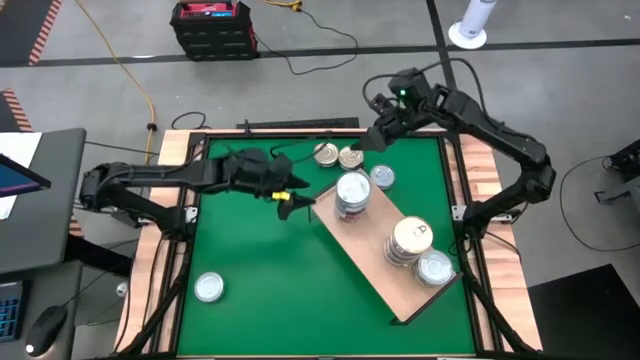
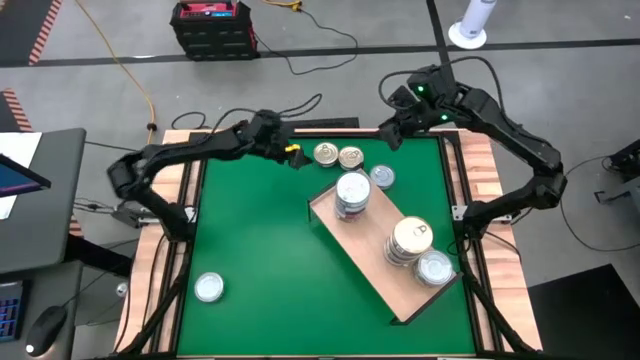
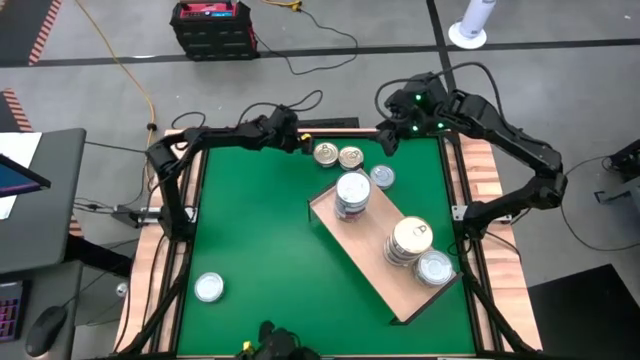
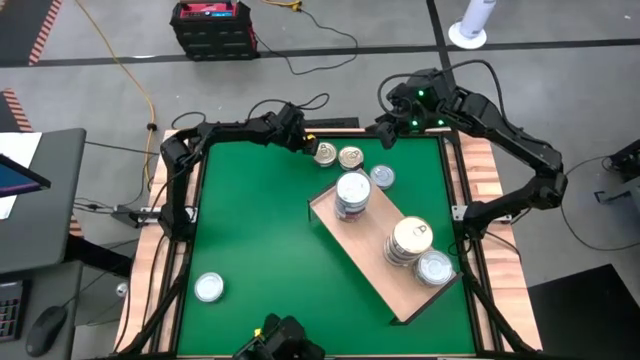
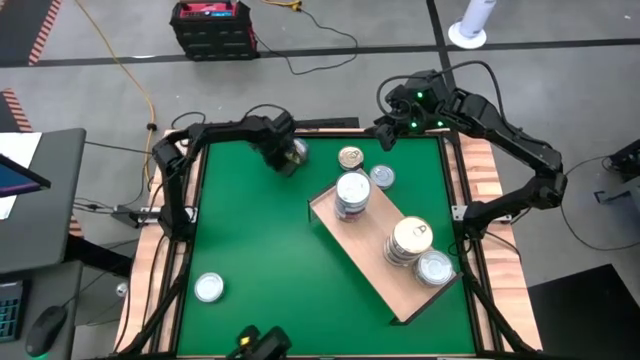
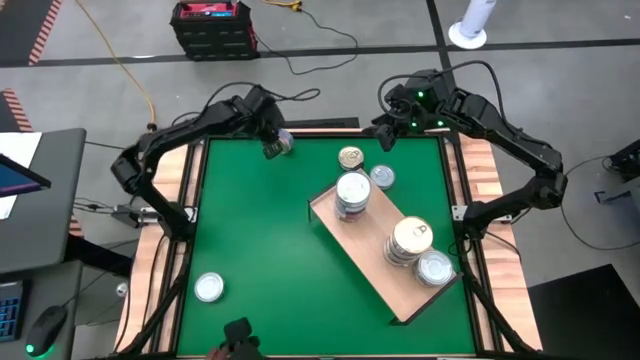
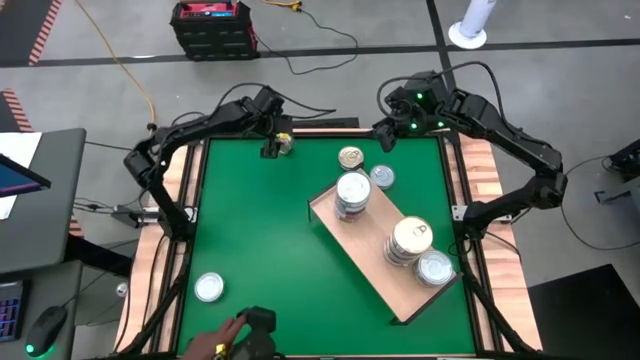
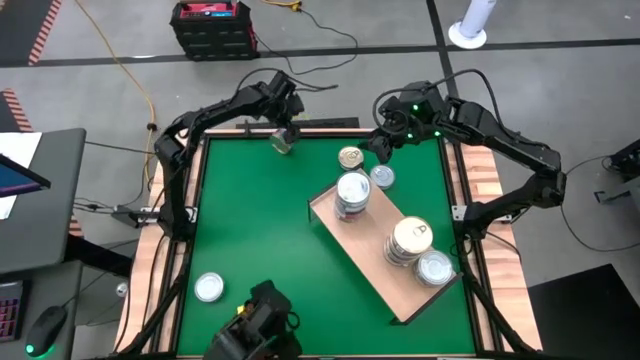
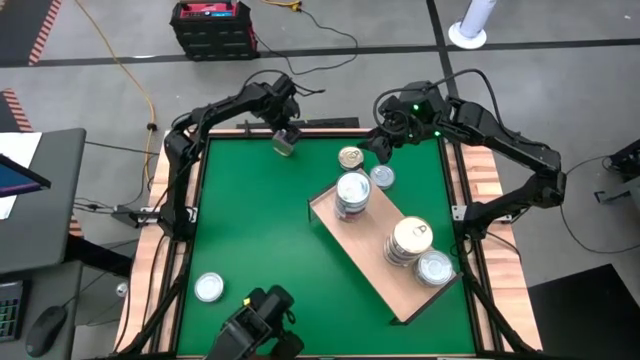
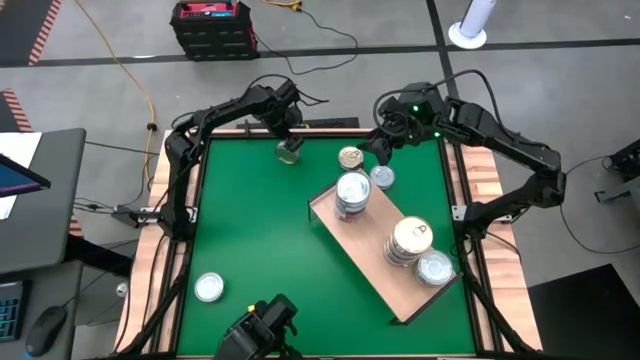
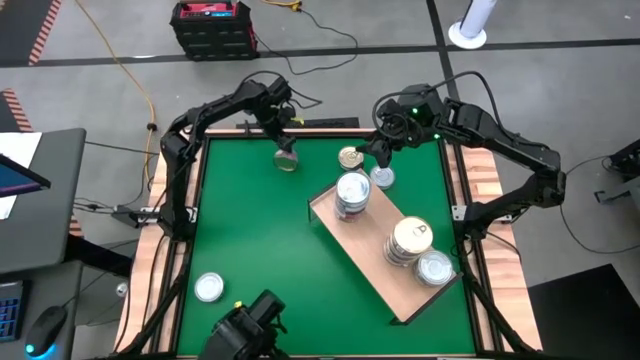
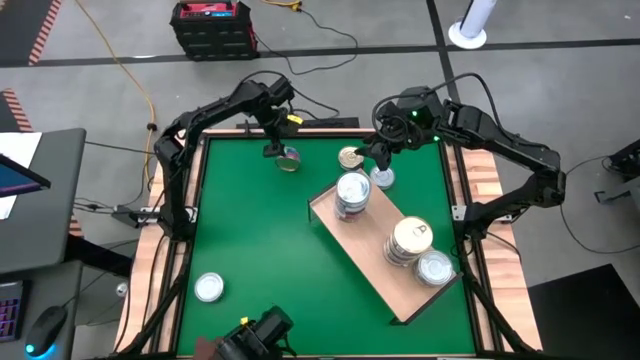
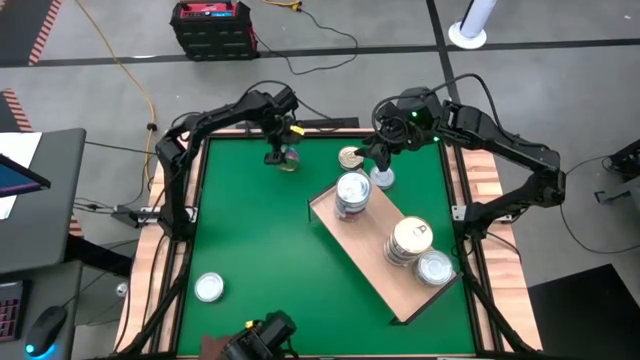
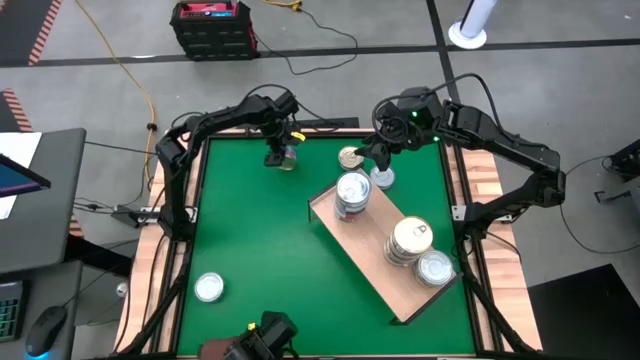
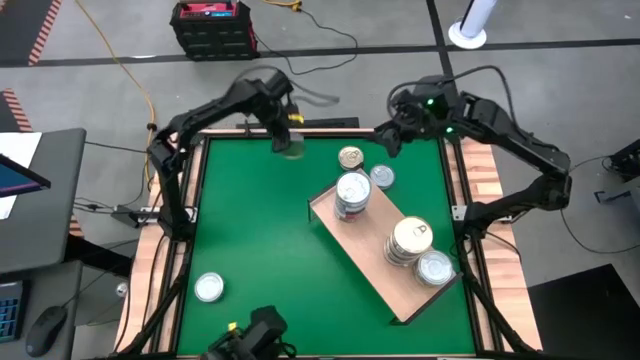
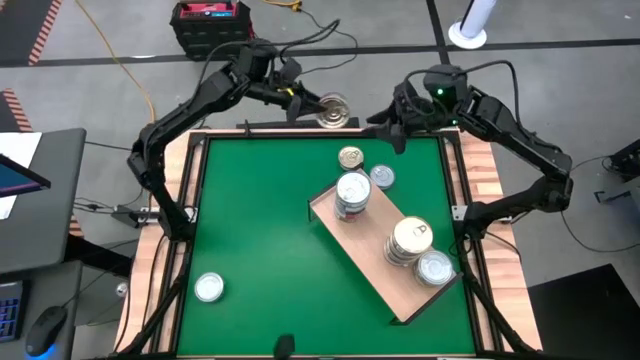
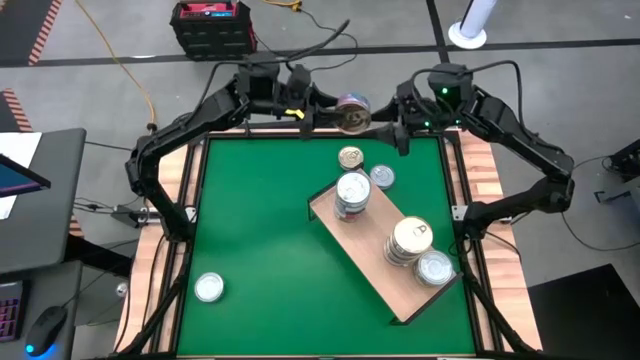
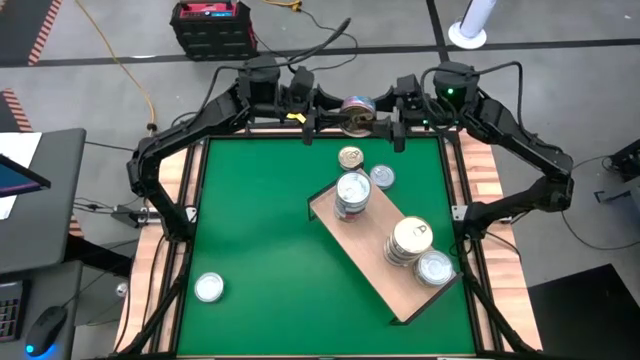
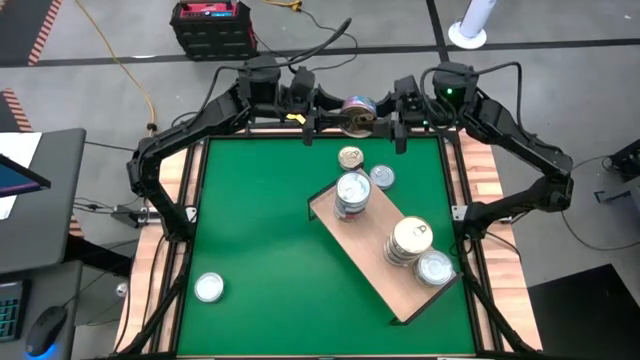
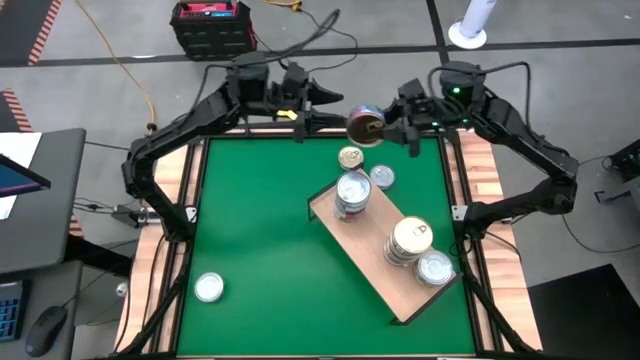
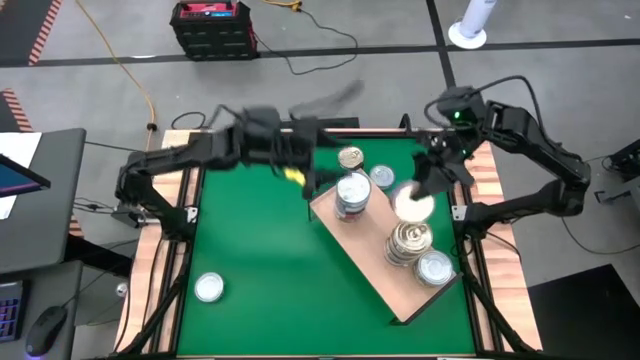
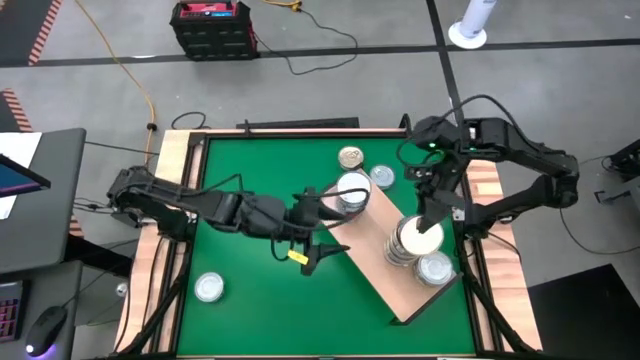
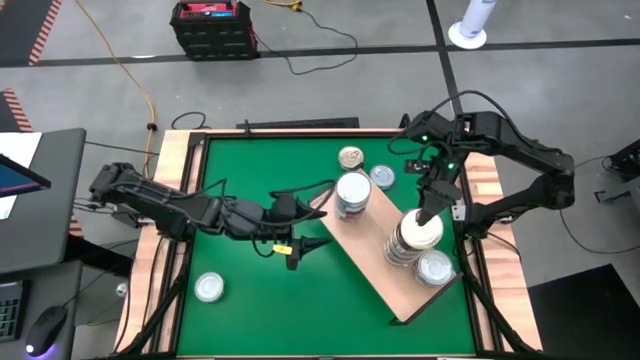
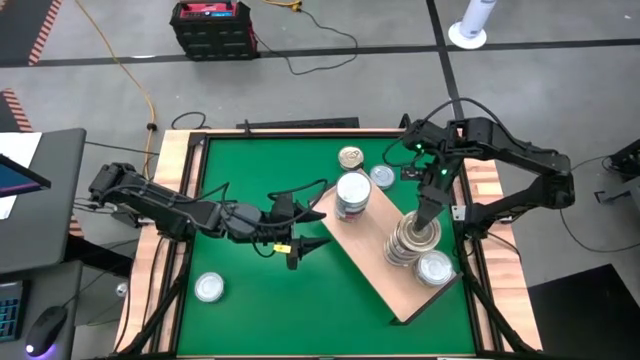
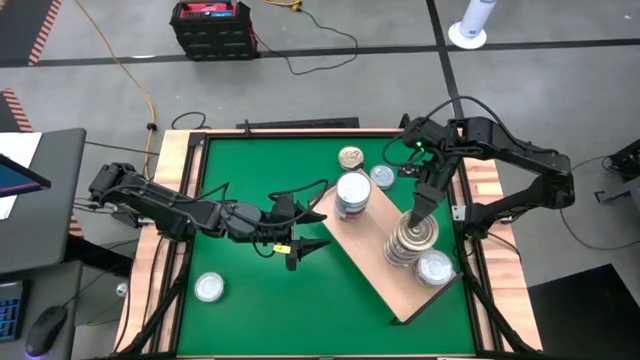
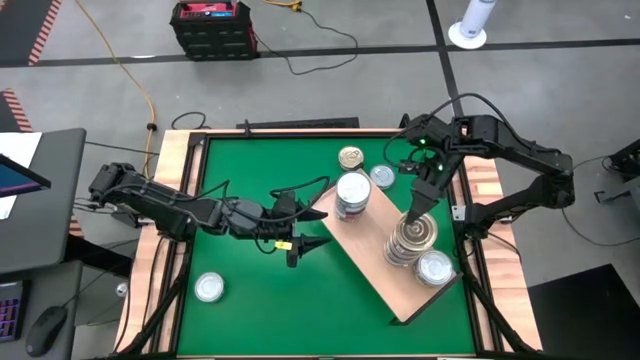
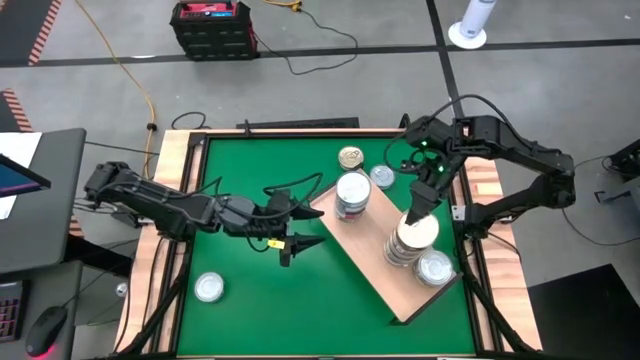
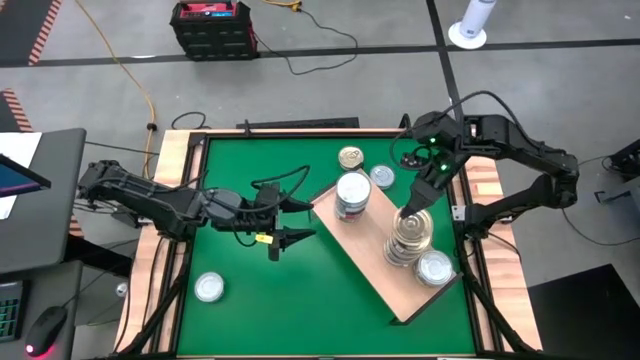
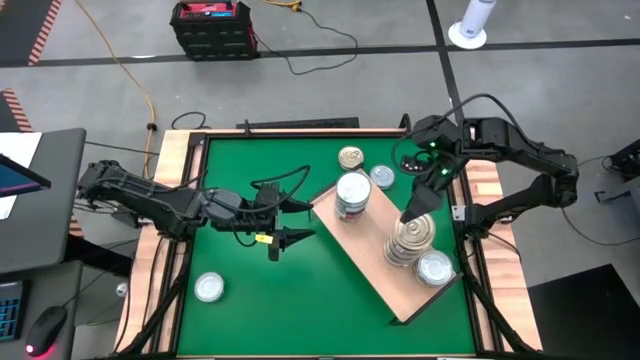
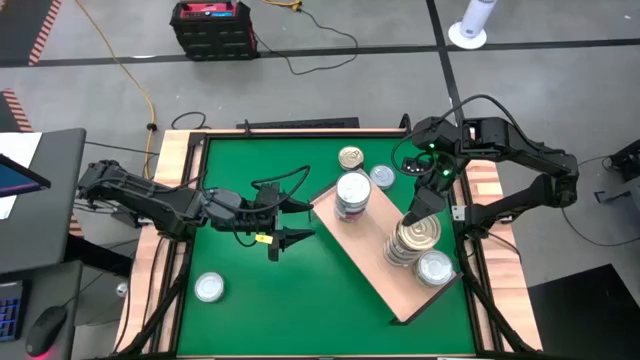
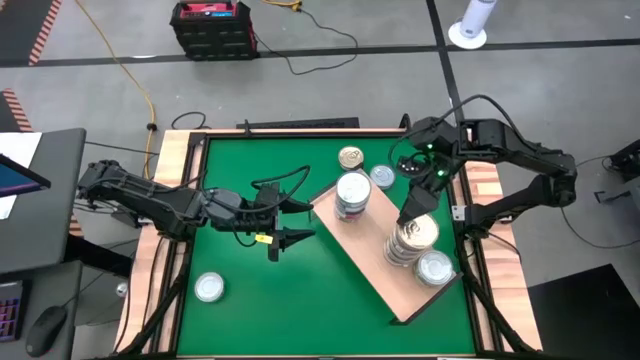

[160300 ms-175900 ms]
Task: Stack canned seafood by type on shelf
Stack the blue and pink tuna can on top of the other blue and pink tuna cans on the shelf

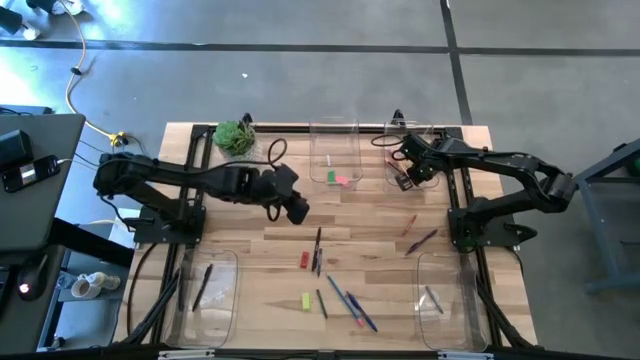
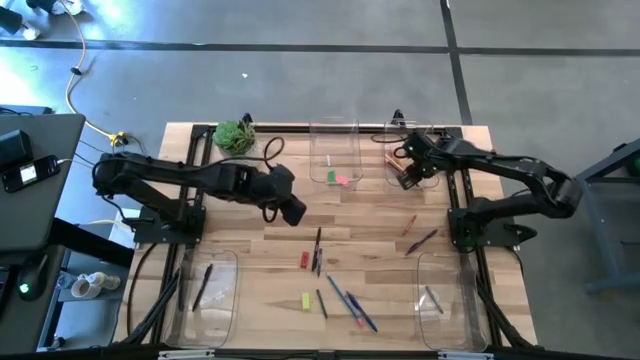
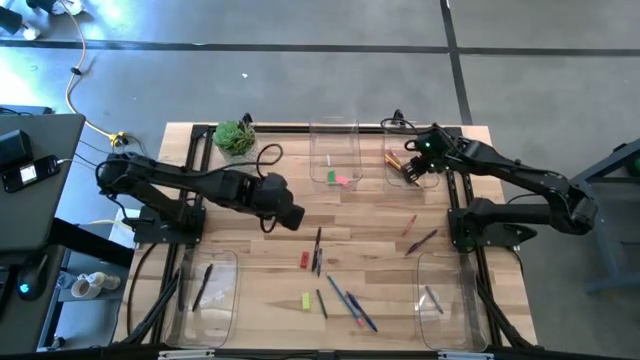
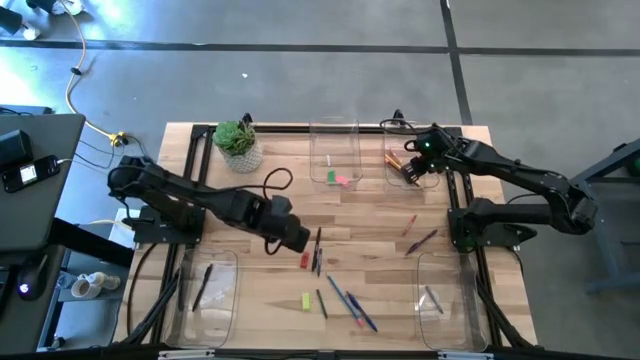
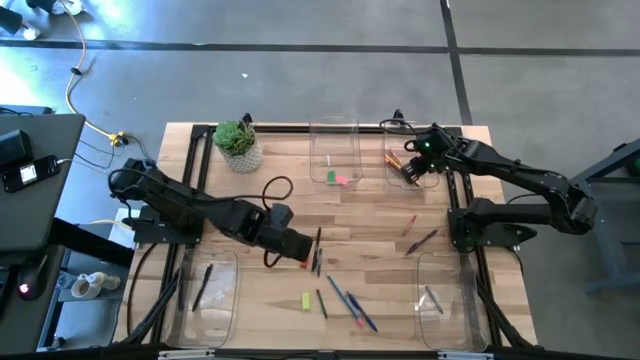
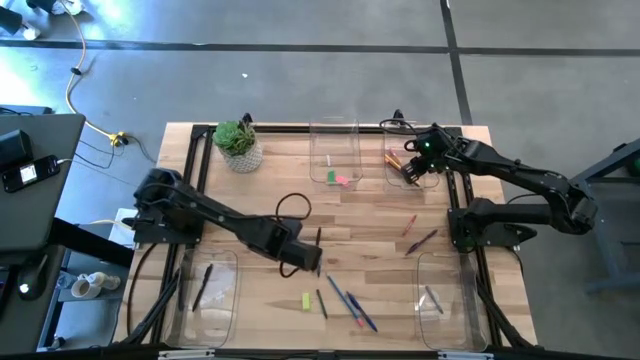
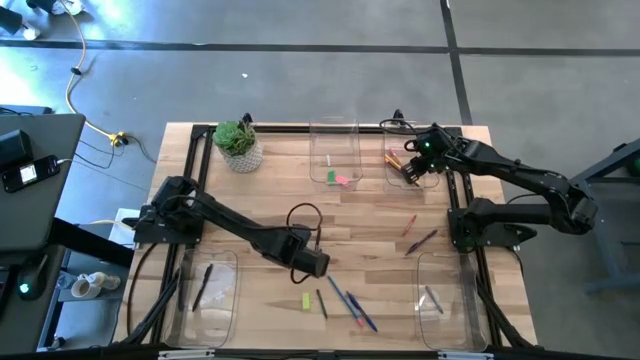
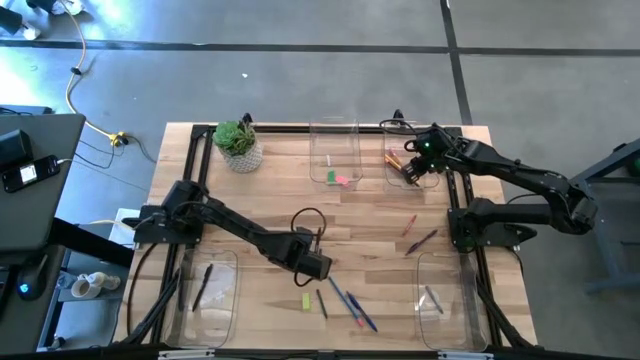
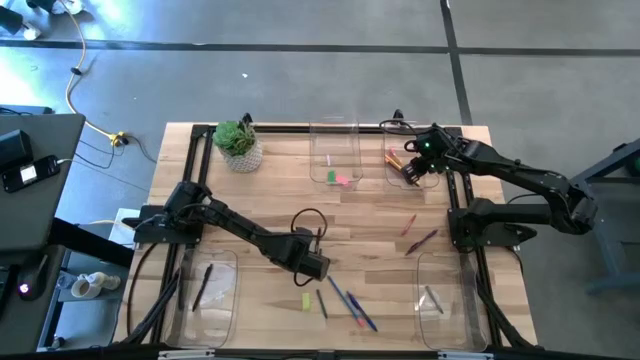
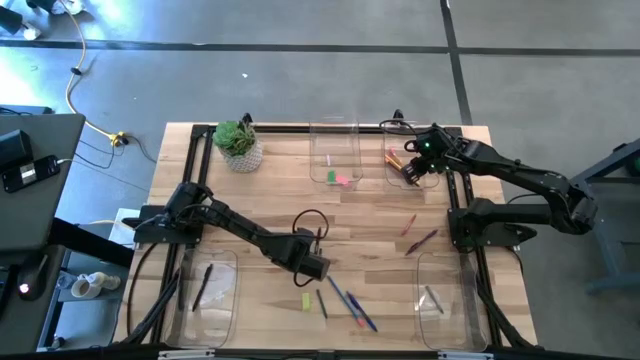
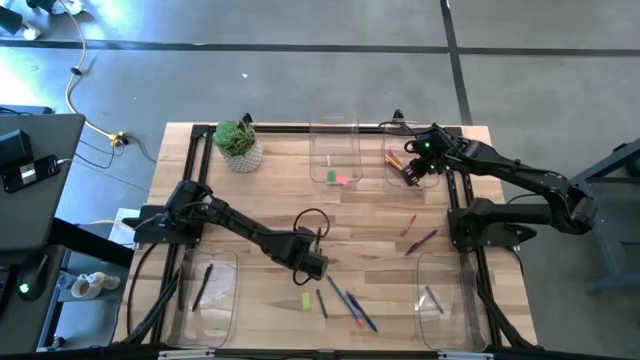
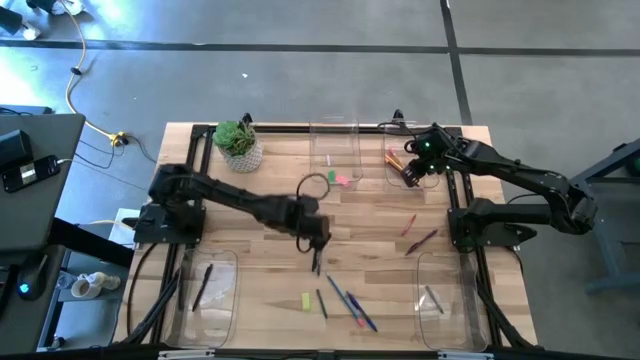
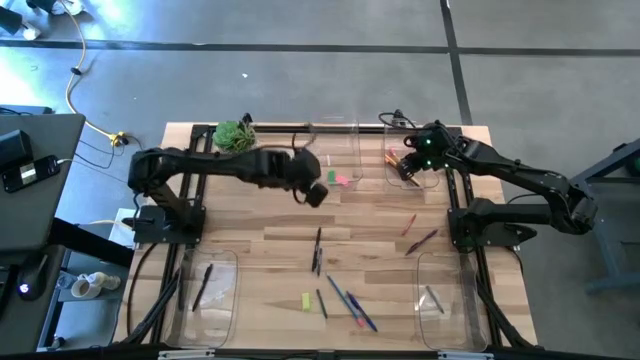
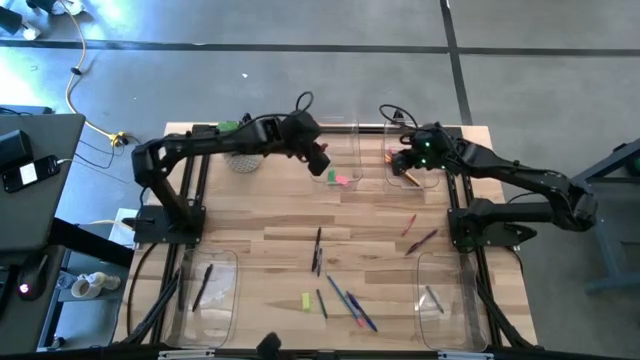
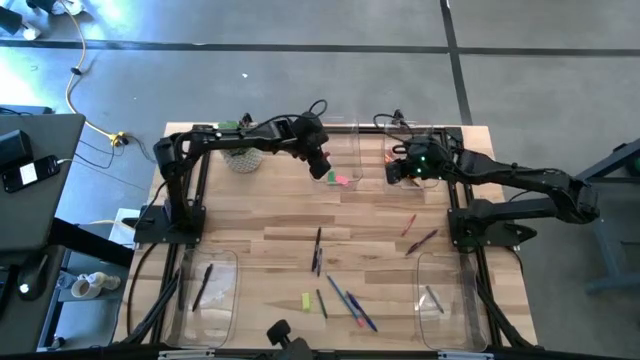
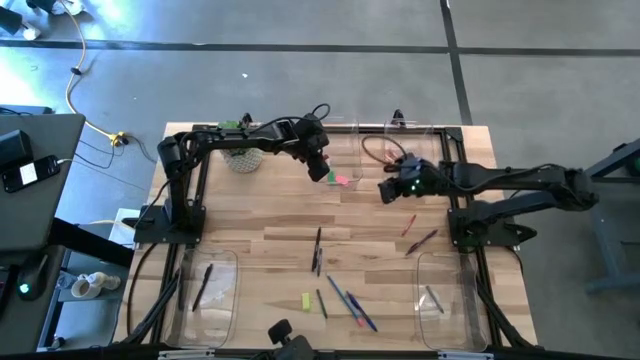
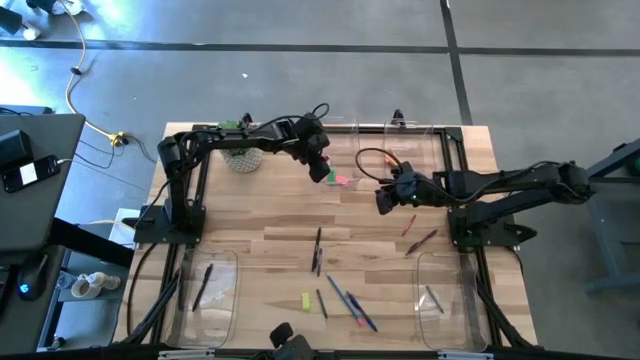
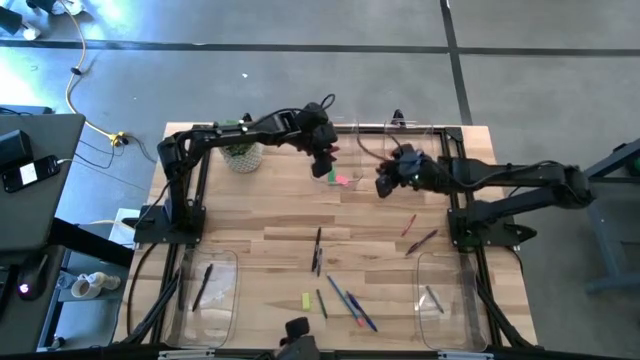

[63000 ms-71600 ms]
Task: Sort crayons/erasers/pens/pencils in bins
Put the red eraser into the top right transparent bin
